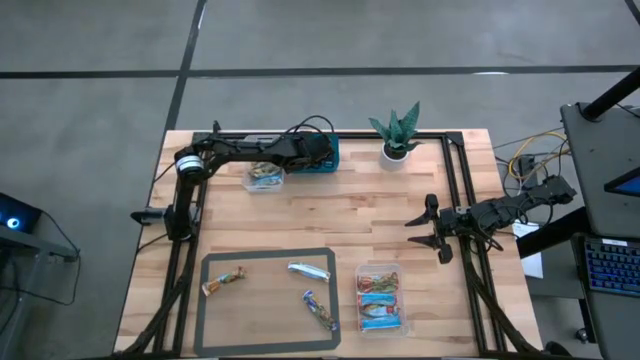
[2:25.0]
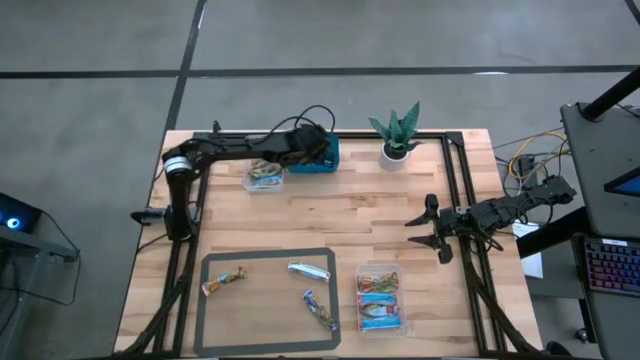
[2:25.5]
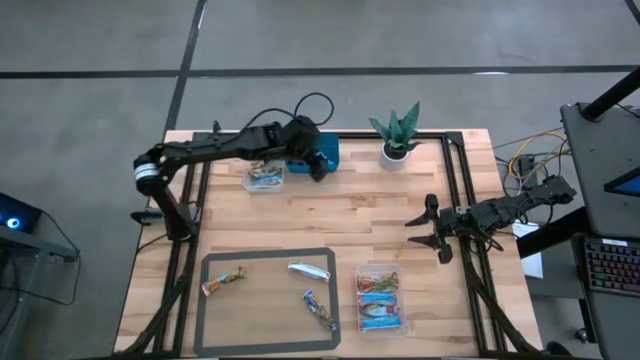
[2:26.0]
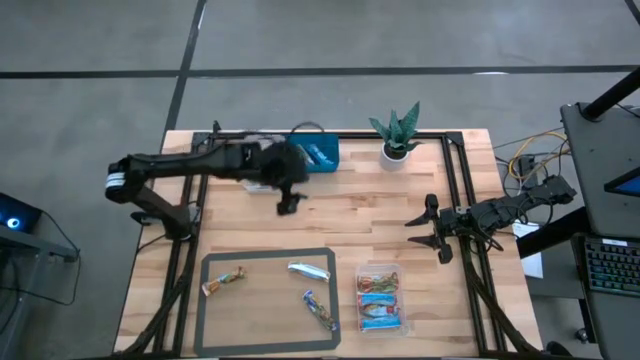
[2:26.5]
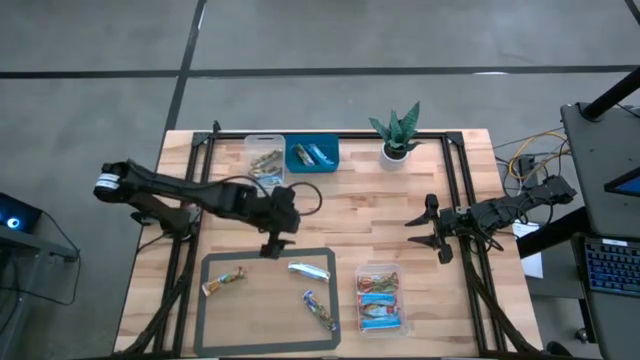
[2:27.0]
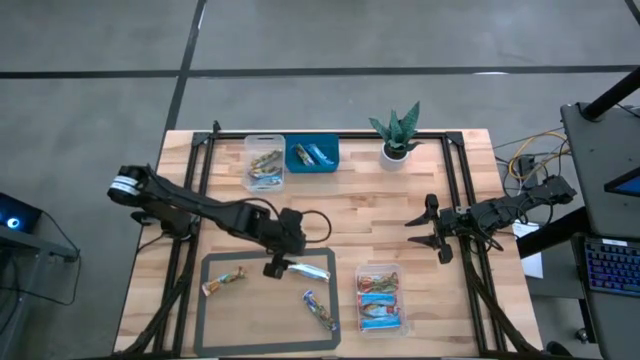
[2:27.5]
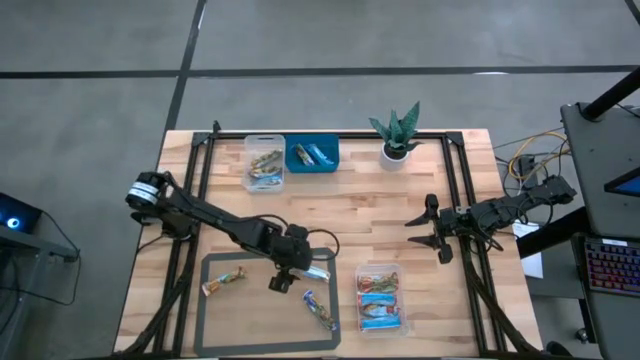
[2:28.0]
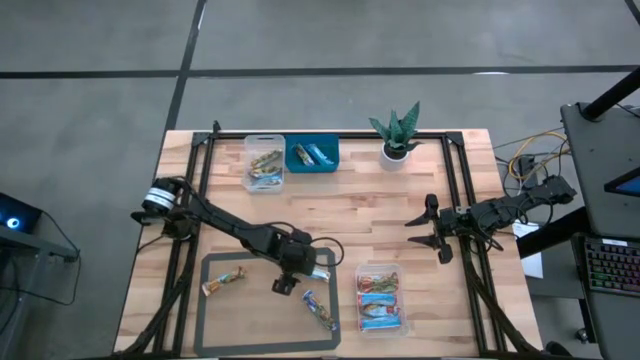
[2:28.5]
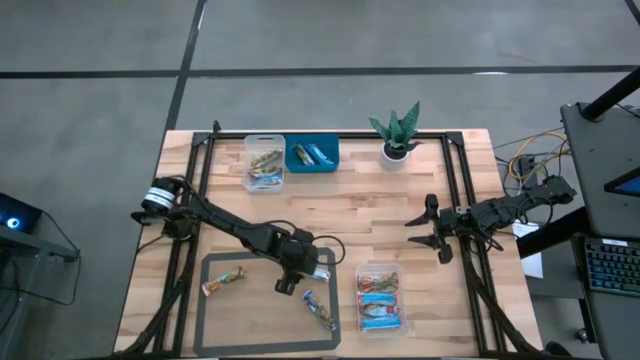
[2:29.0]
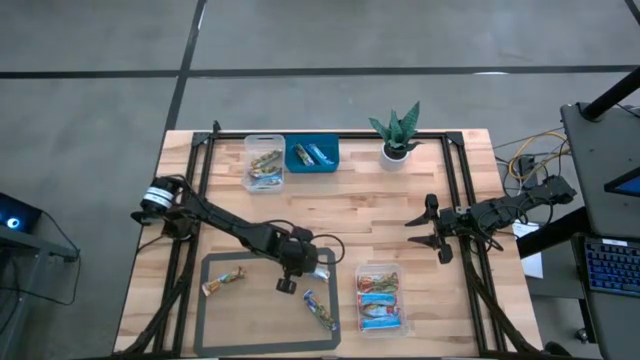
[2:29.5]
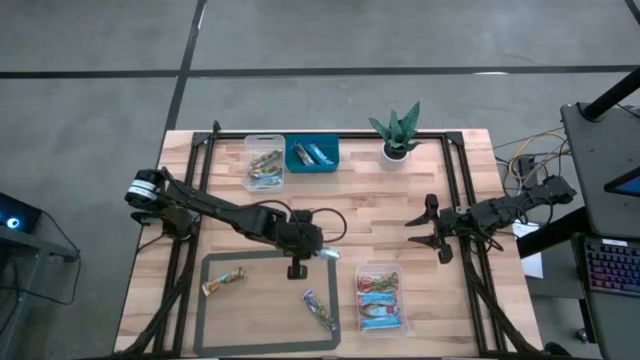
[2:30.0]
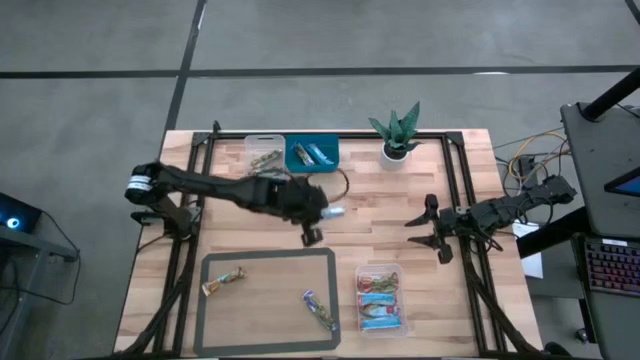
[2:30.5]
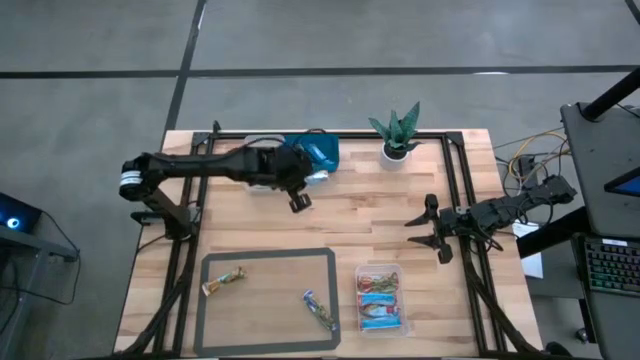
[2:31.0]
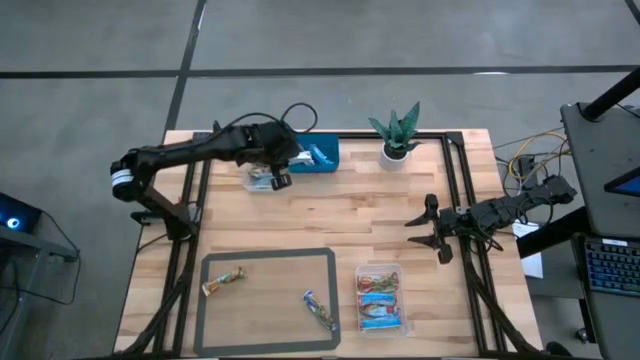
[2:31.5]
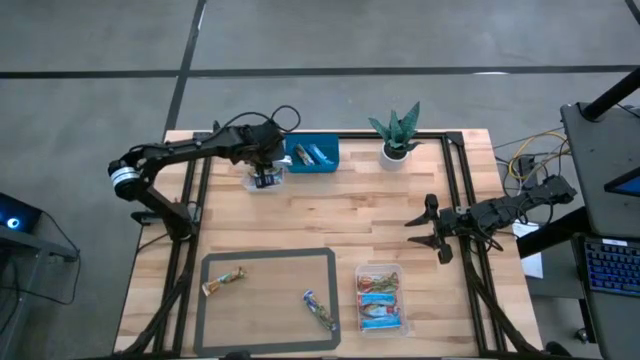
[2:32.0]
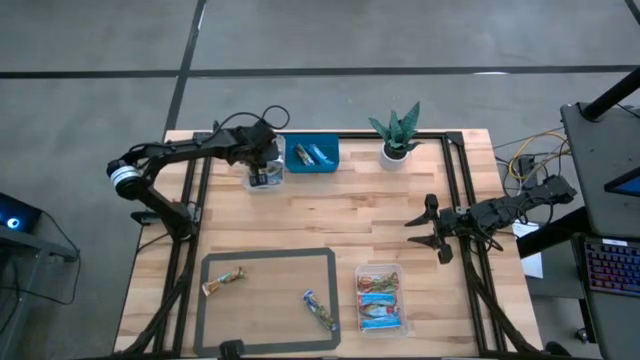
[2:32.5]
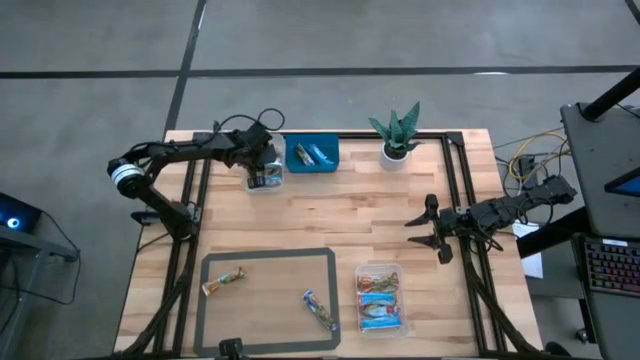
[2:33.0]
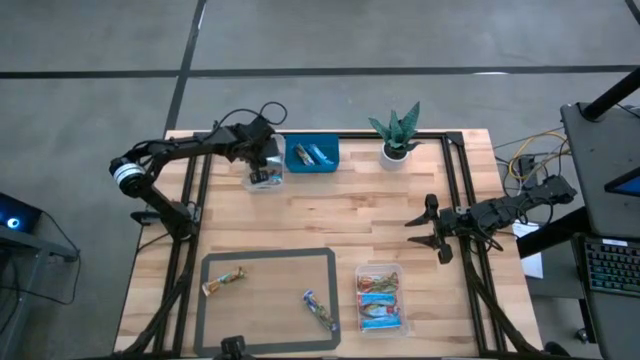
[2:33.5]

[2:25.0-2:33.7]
Task: Pick and place Granola Bars by type
Put the yellow granola bar into the top transparent bin

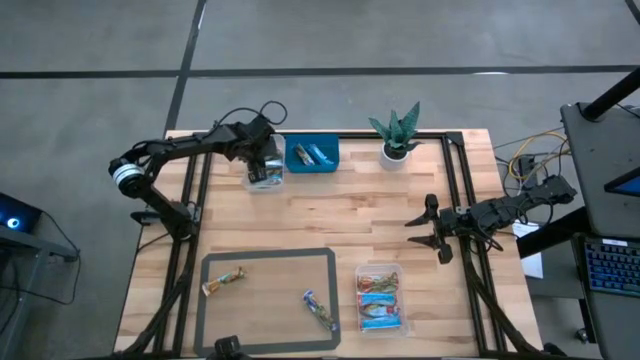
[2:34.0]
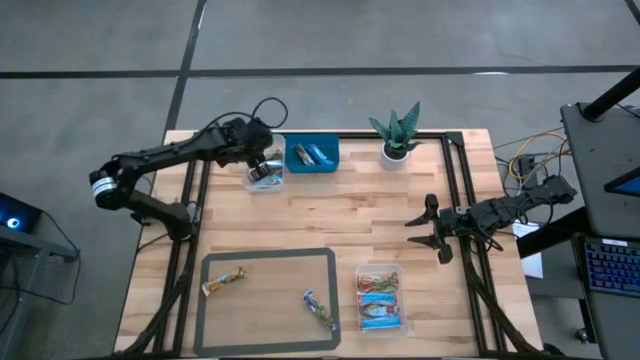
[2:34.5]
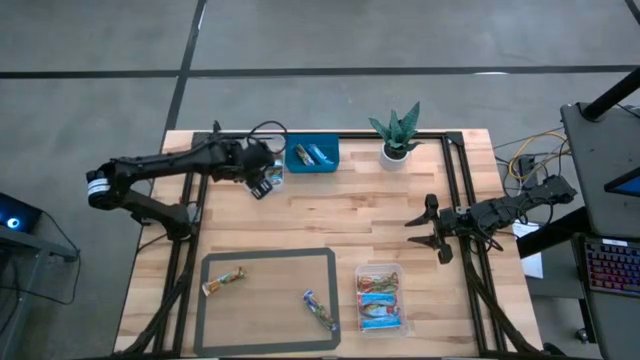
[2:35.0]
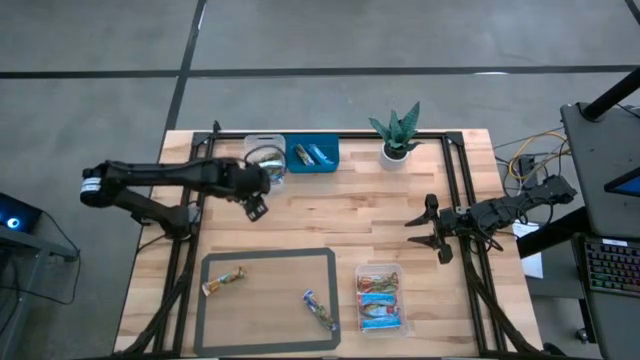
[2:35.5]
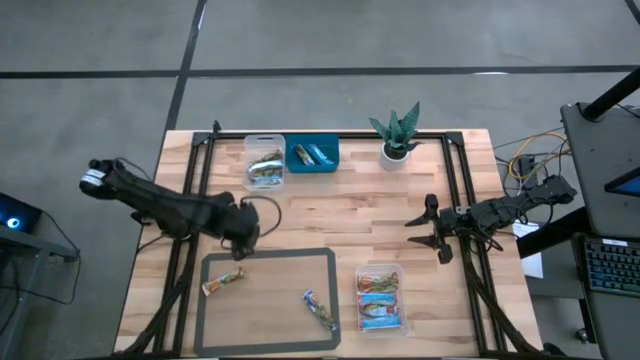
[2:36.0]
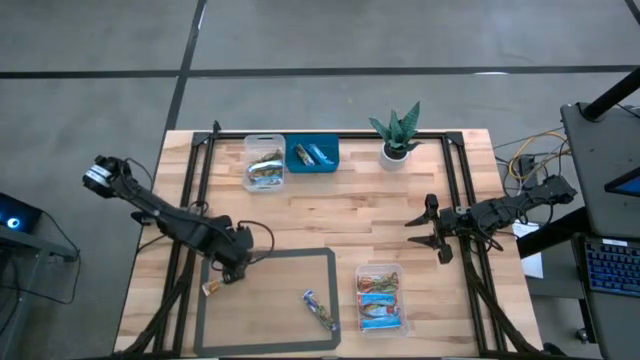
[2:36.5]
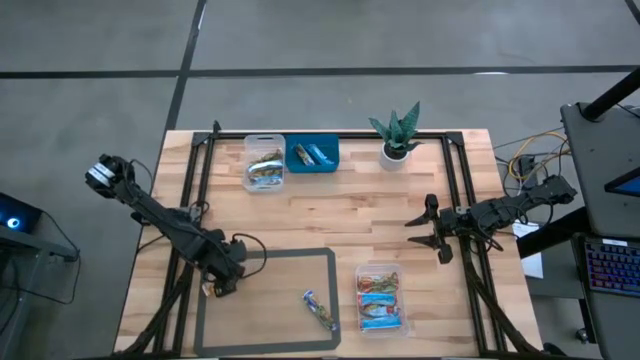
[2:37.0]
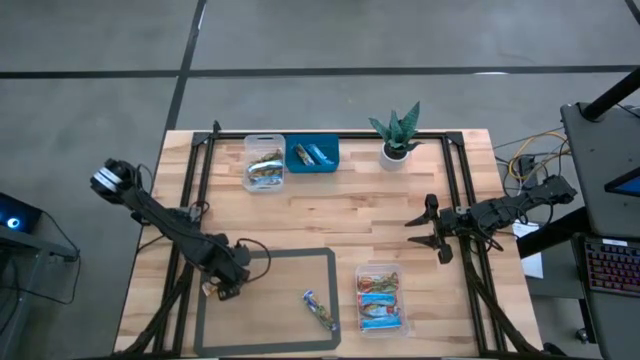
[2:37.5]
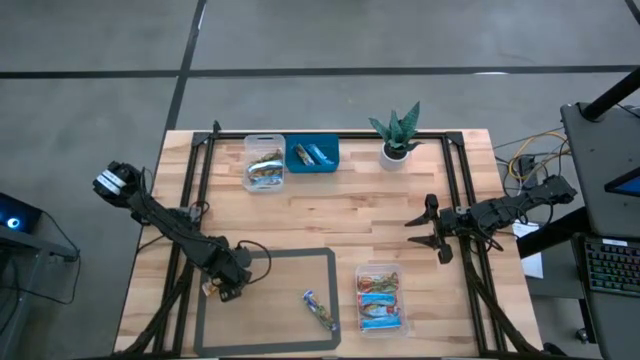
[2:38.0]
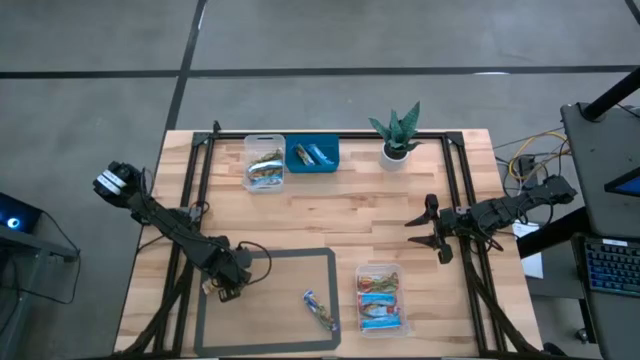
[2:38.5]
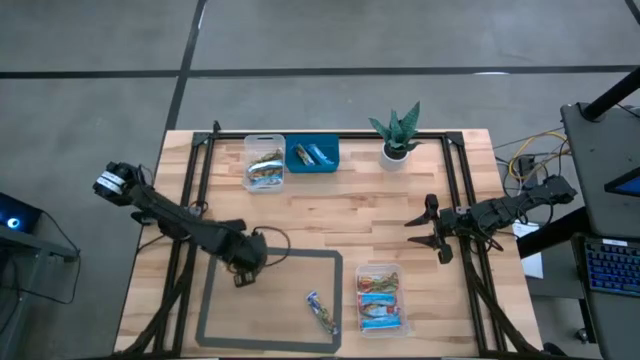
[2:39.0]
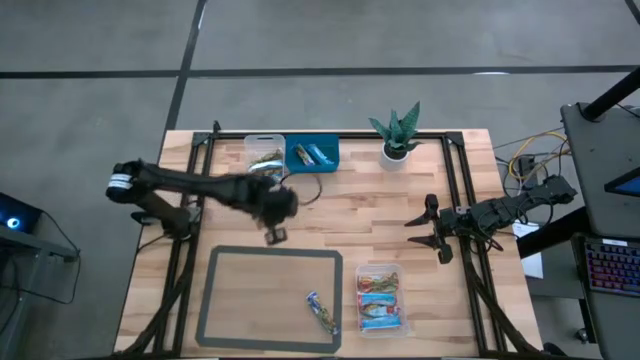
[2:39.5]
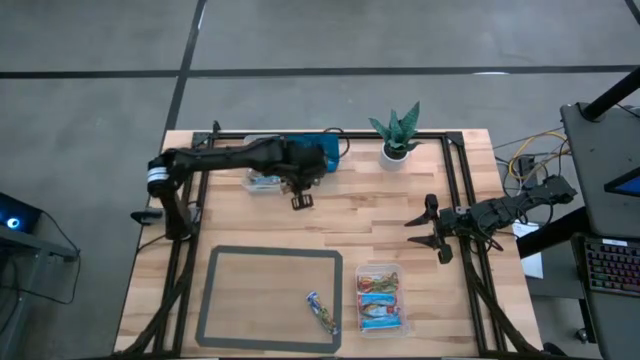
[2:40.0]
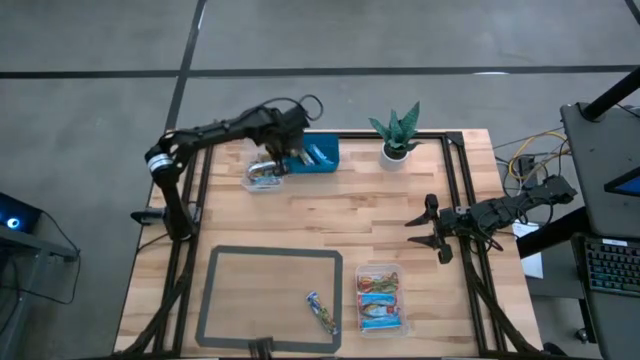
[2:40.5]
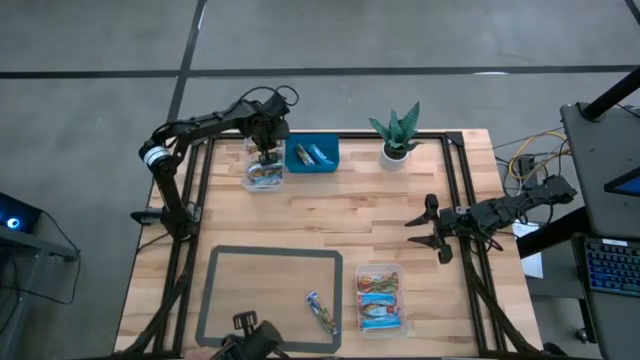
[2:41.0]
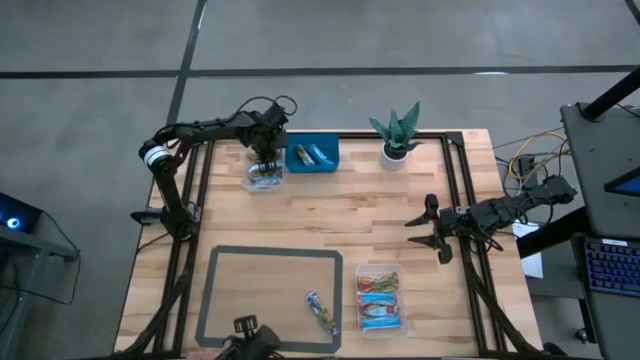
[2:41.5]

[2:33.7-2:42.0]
Put the yellow granola bar into the top transparent bin

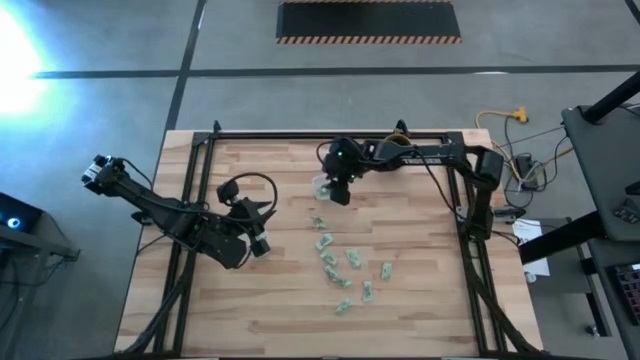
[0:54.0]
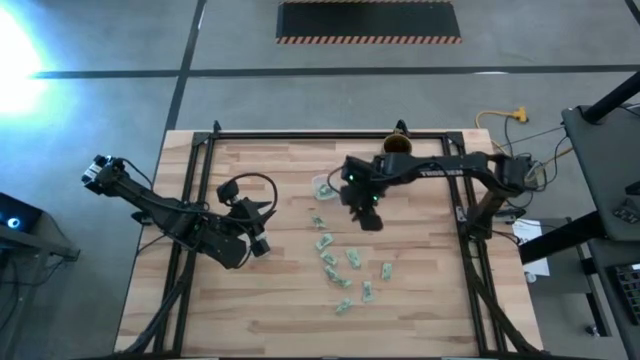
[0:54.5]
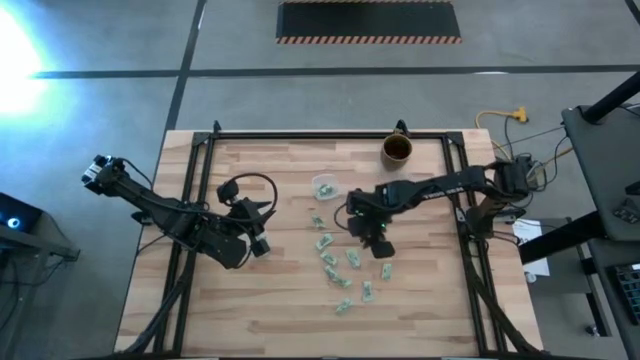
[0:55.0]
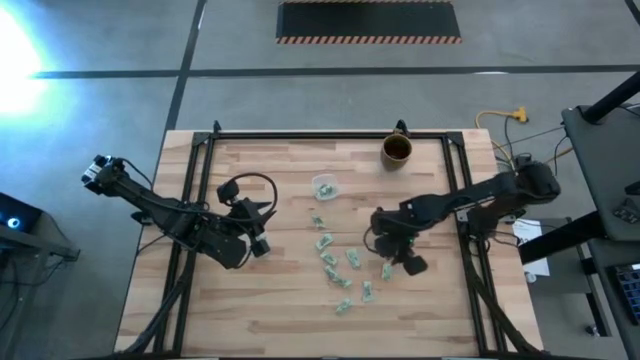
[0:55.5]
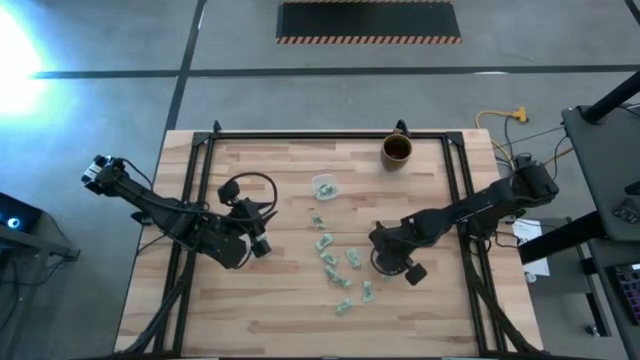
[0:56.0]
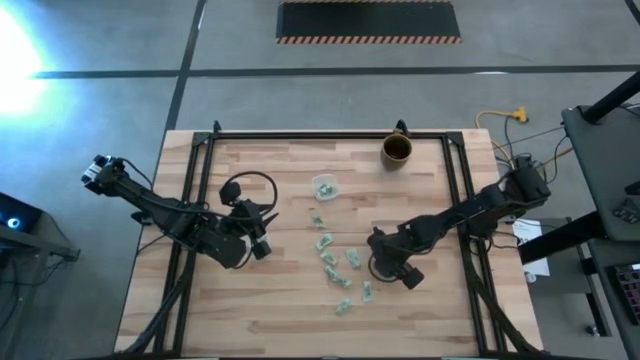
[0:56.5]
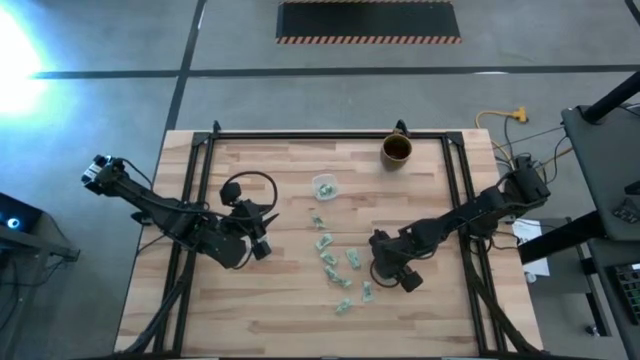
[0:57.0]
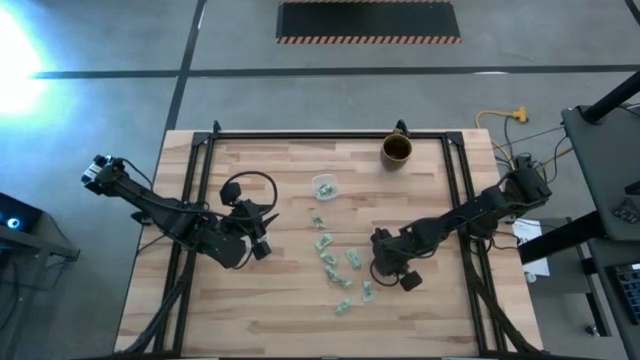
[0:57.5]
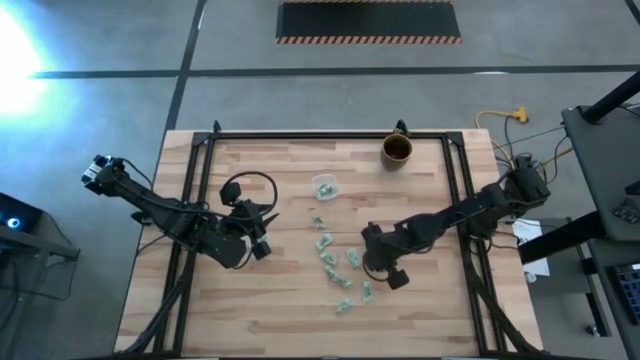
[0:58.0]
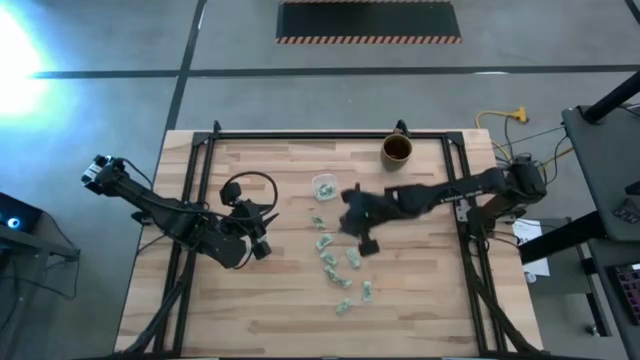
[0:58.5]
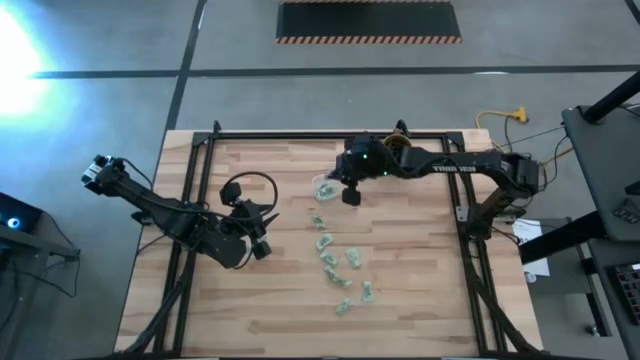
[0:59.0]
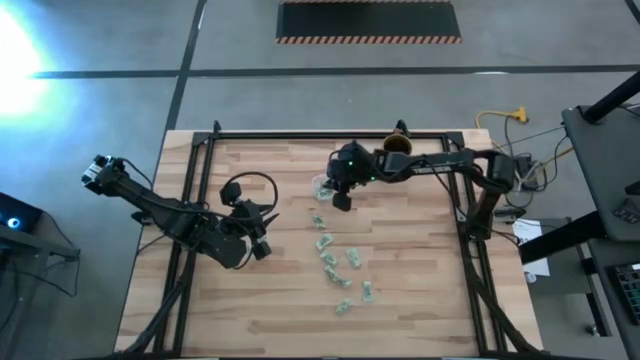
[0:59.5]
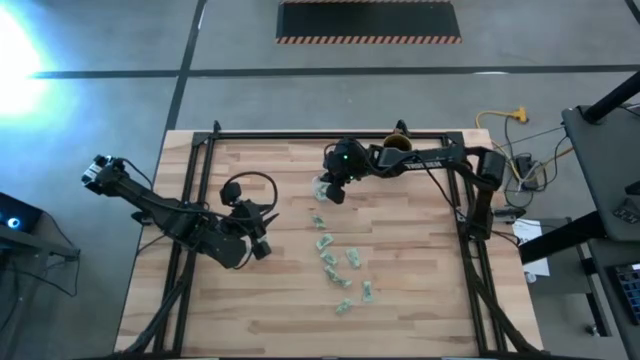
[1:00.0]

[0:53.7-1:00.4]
Task: Pick and place Stevia / Truvia into bins
Put the stevia packet into the top transparent container
